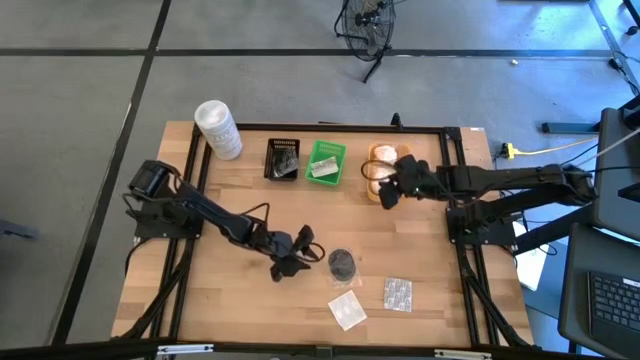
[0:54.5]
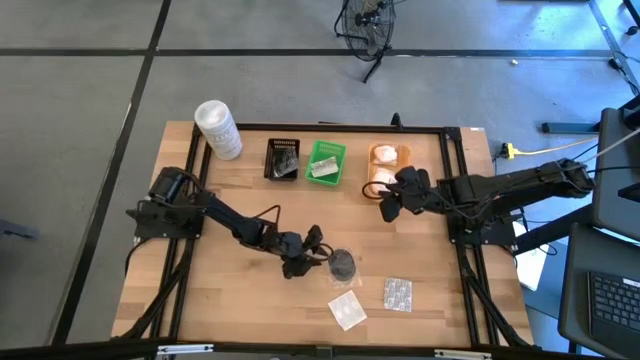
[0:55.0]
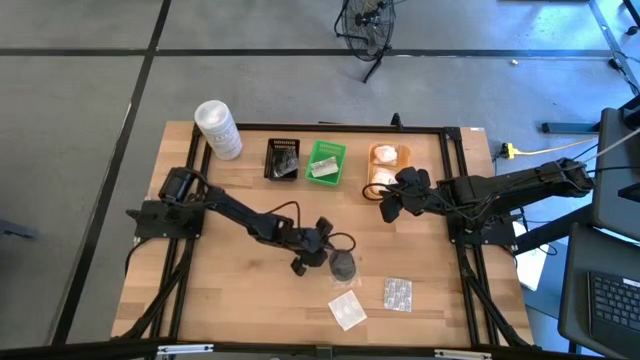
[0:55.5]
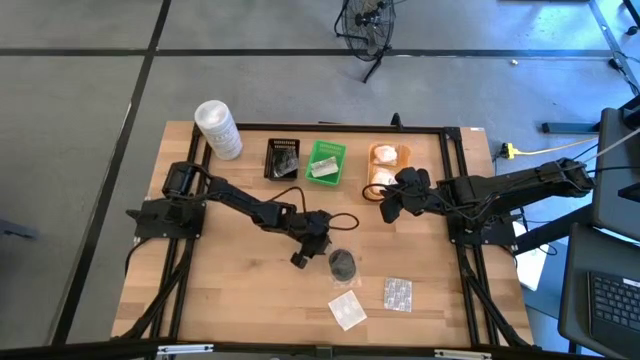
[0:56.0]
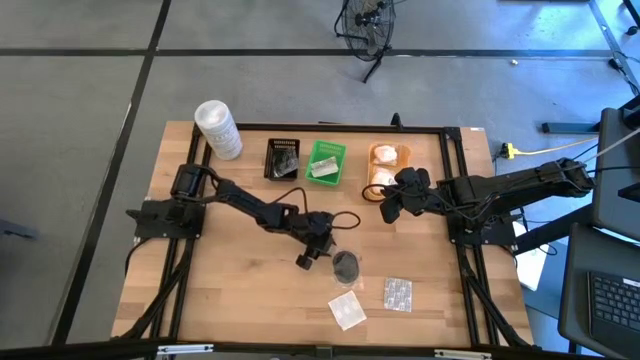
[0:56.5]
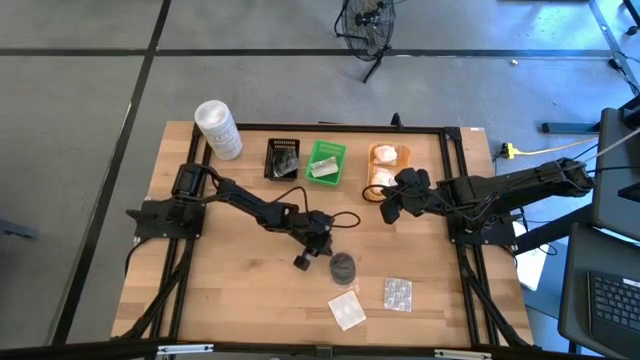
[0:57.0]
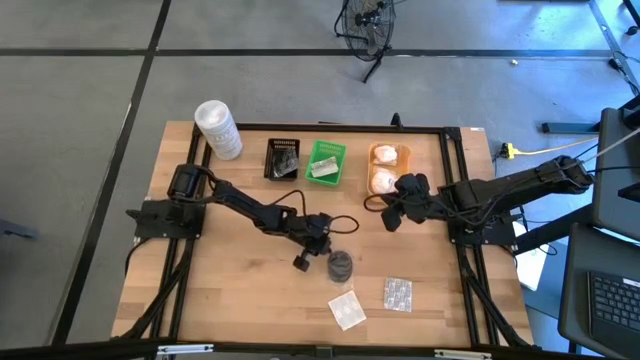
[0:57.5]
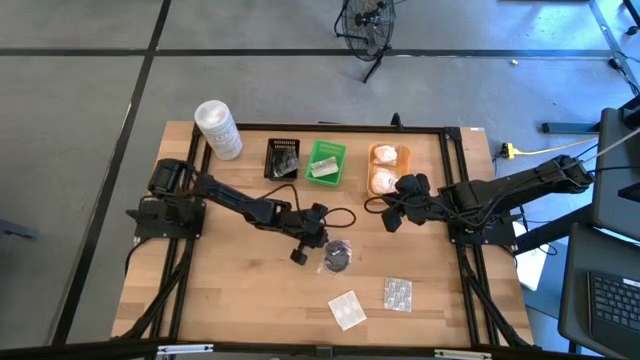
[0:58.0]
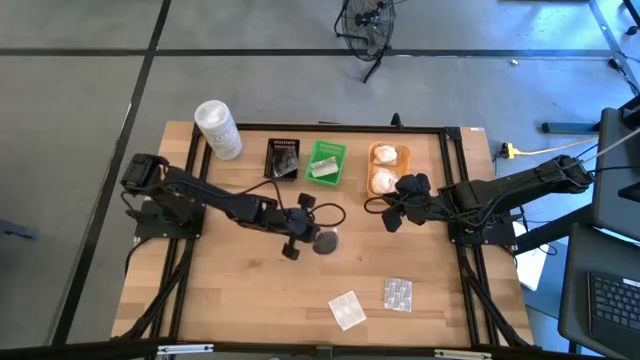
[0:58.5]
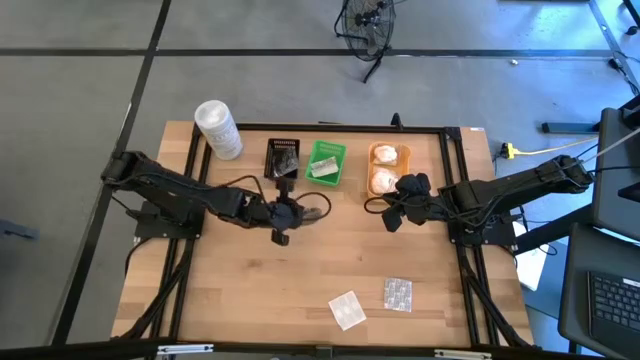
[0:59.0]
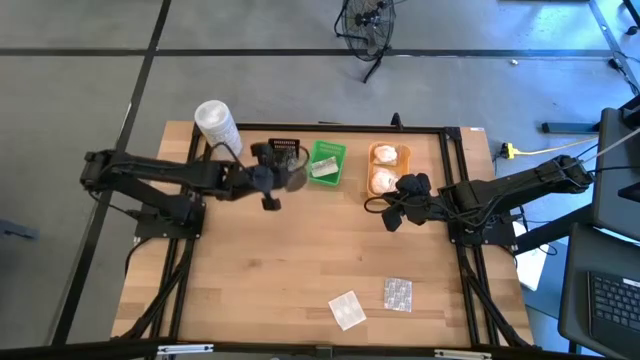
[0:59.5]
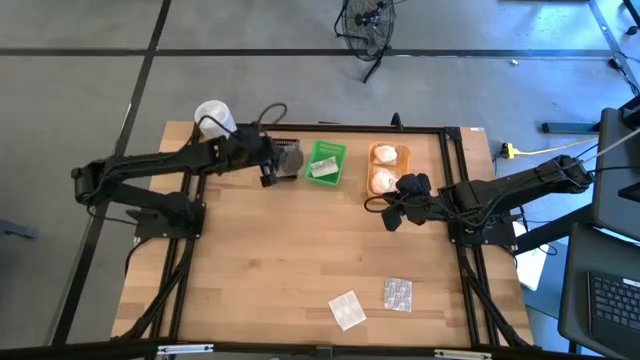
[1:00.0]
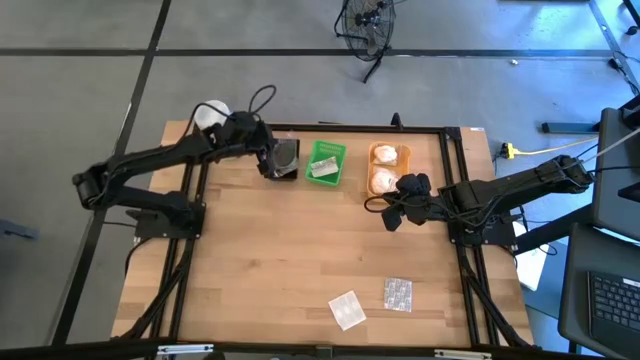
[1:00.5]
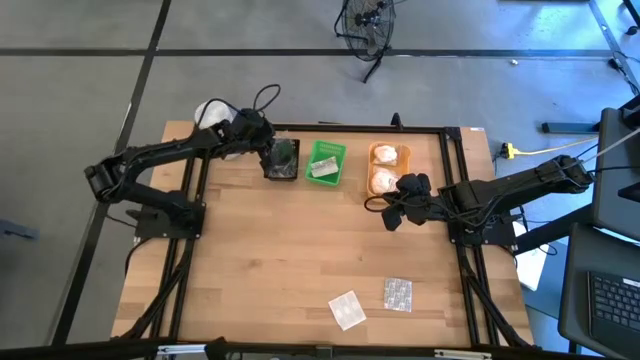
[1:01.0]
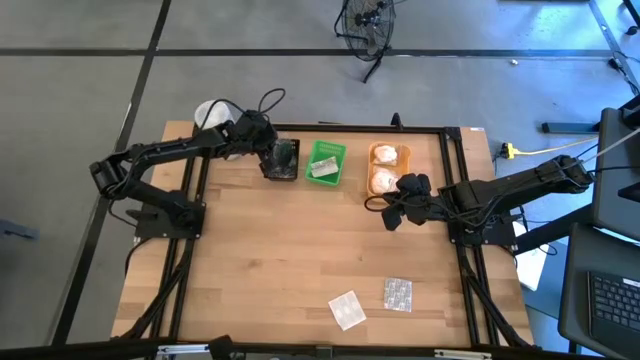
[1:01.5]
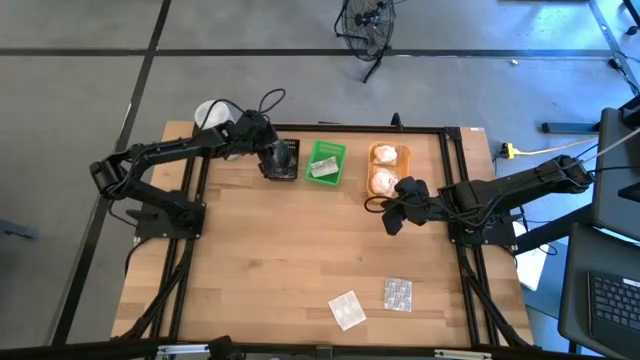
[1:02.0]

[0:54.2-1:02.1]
Task: Pick & Place Travel size toiletries
Put the black hairbrush into the black bin

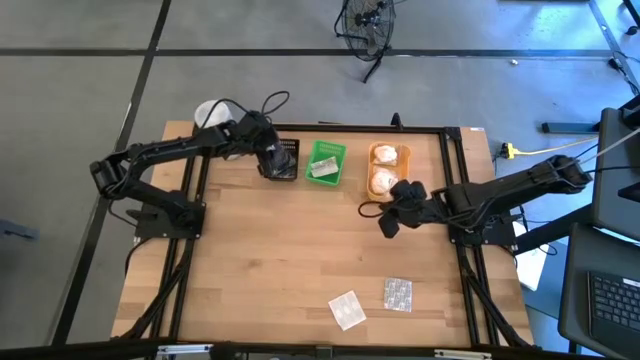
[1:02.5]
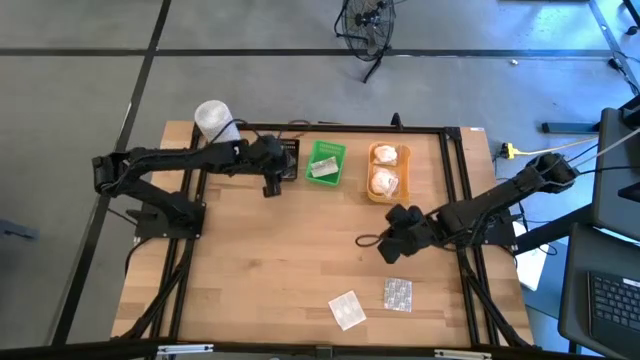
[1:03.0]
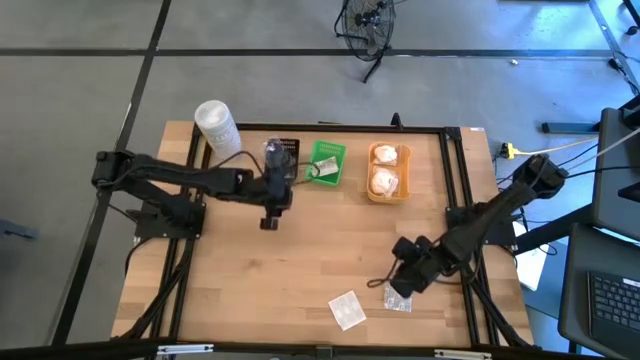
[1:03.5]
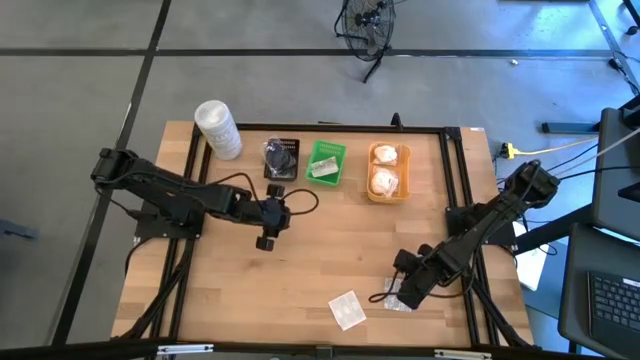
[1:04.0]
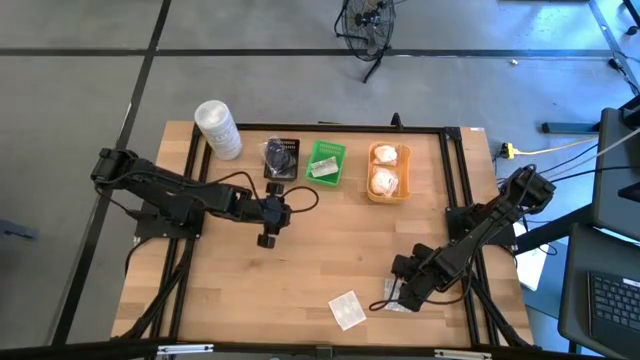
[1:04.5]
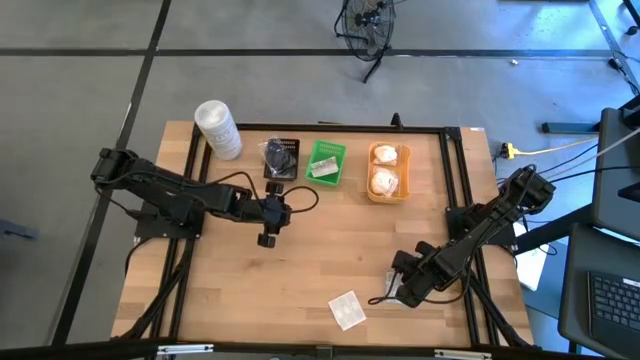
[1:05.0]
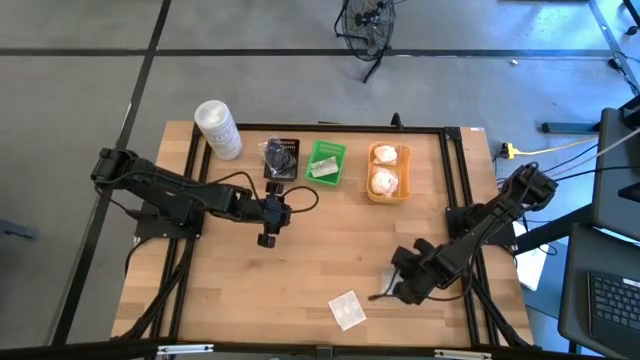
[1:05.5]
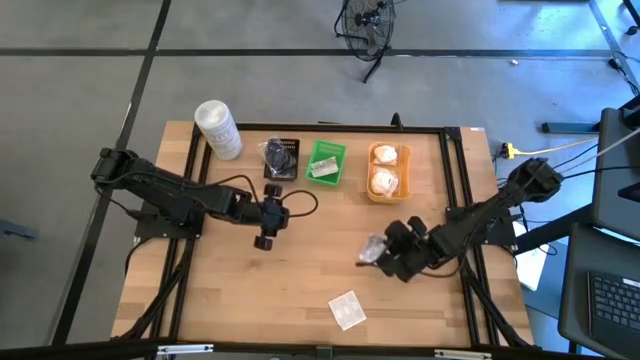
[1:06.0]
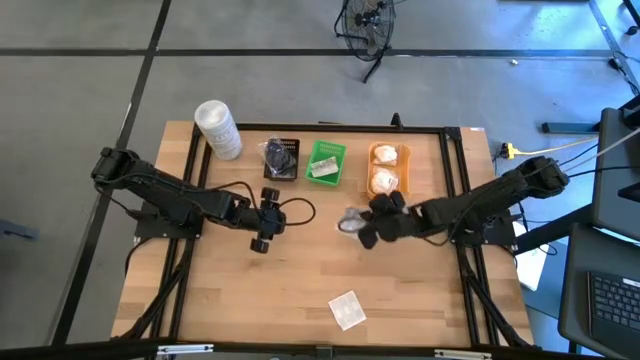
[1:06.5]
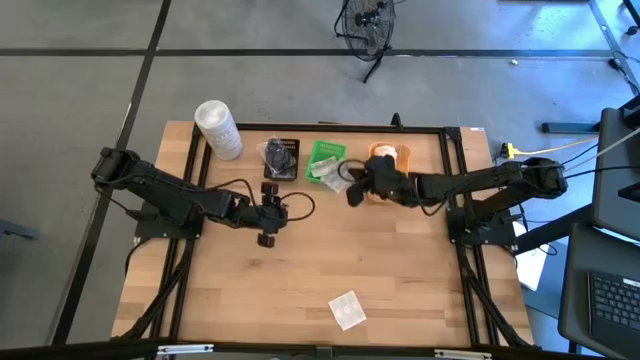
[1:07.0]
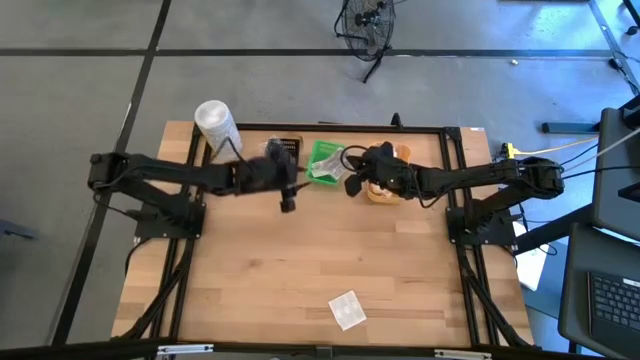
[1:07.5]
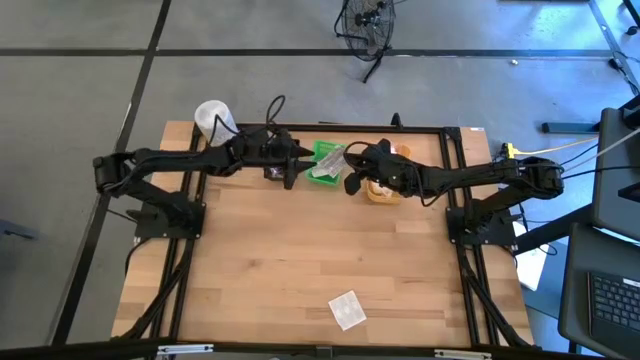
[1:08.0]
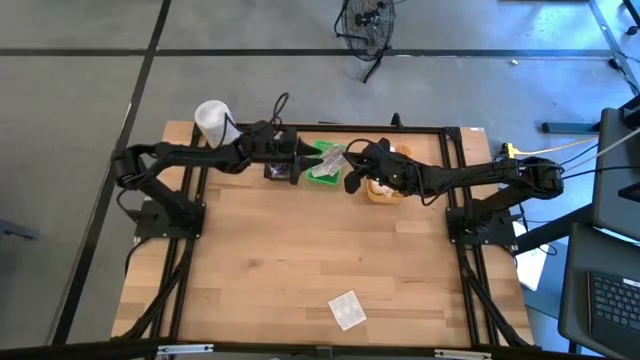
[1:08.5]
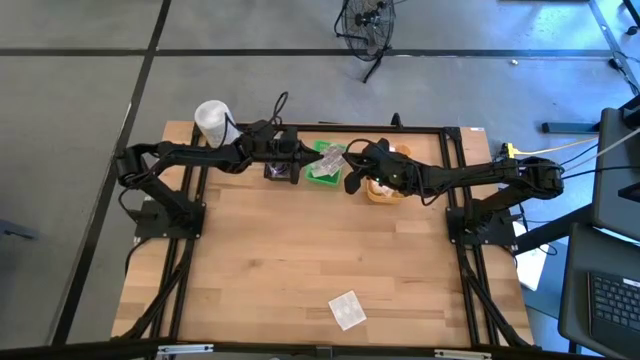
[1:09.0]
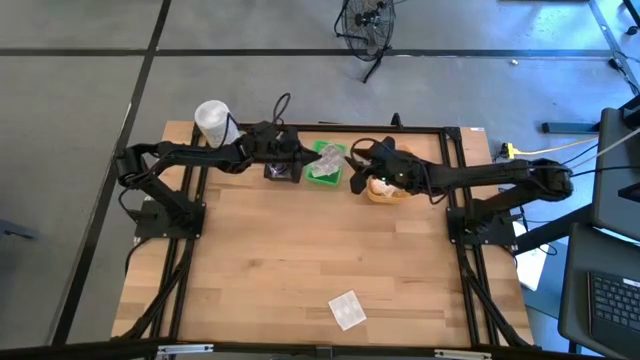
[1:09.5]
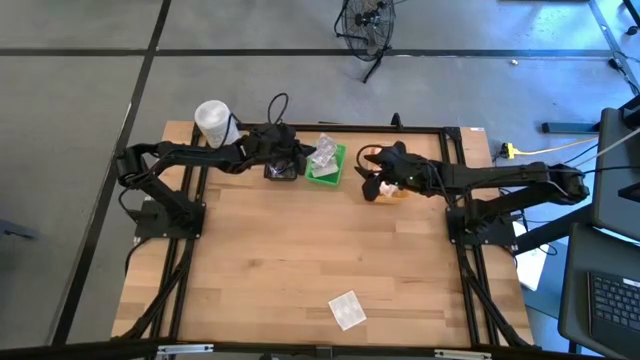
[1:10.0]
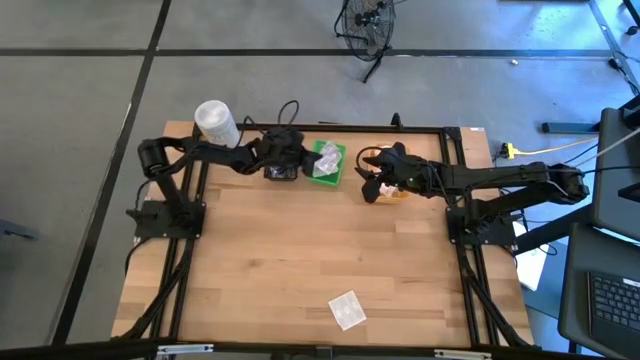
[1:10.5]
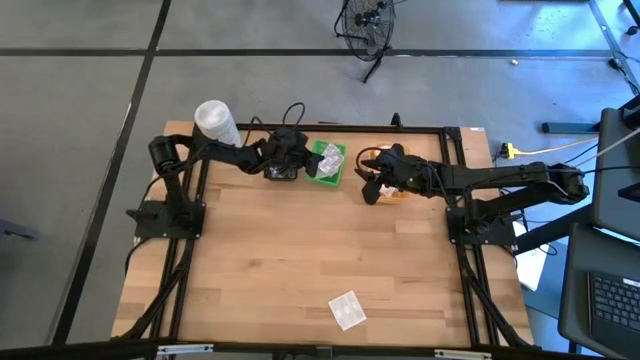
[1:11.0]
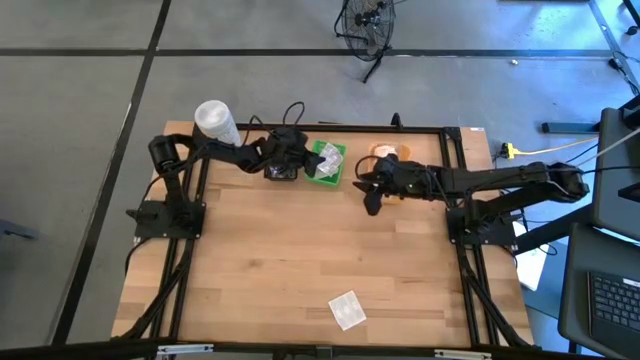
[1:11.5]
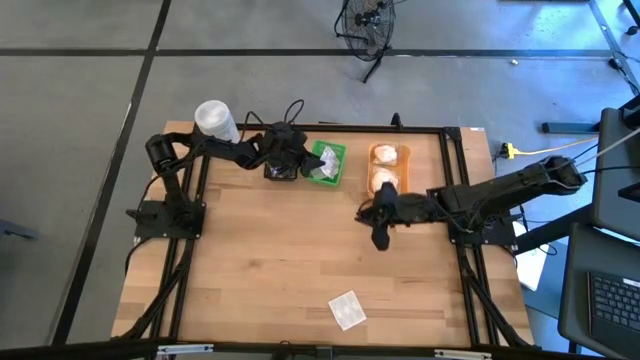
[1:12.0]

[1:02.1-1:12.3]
Put the white bandage pack into the green bin

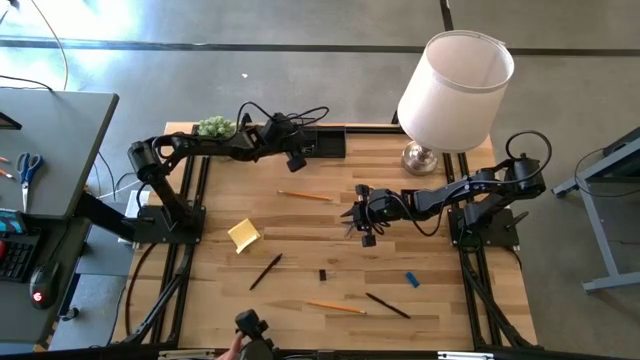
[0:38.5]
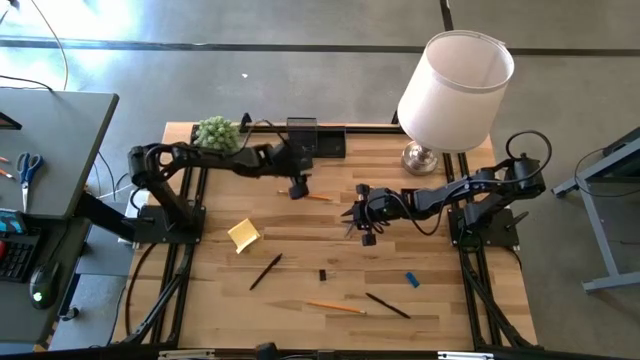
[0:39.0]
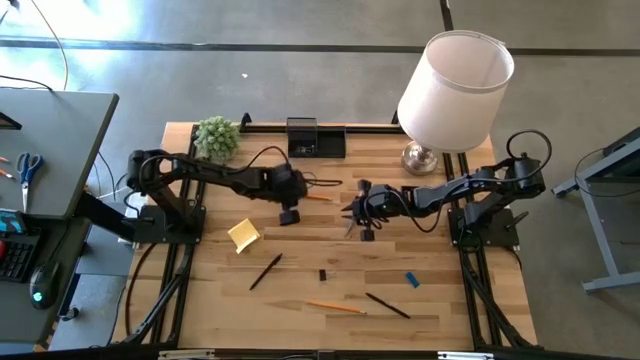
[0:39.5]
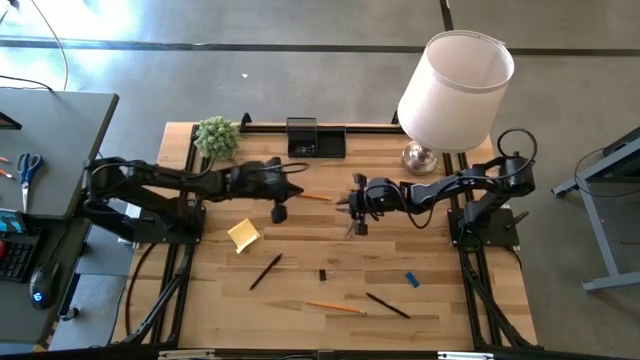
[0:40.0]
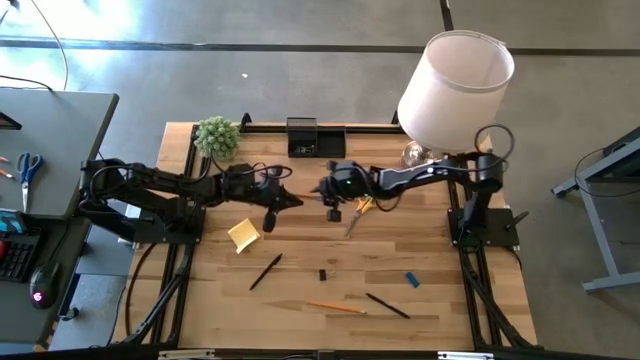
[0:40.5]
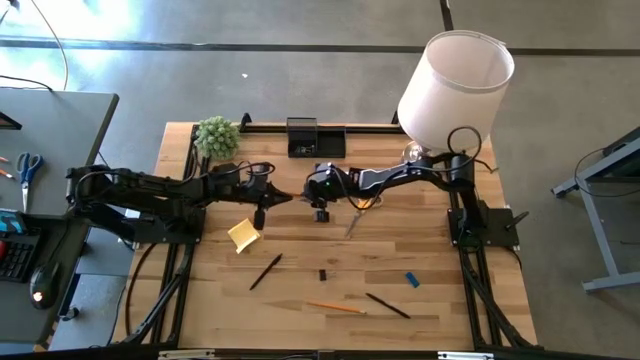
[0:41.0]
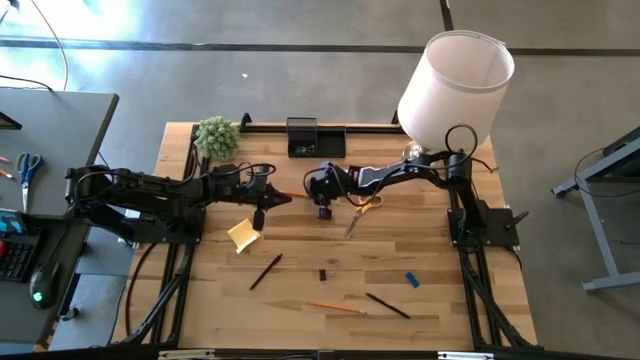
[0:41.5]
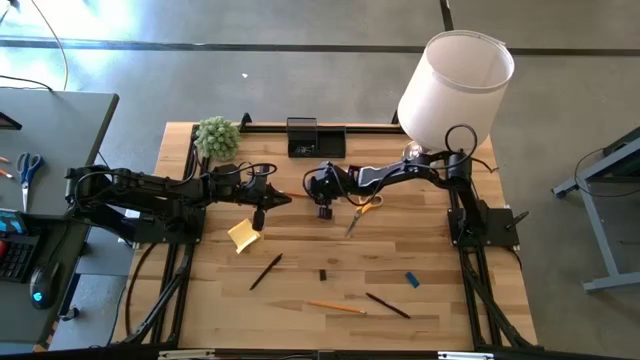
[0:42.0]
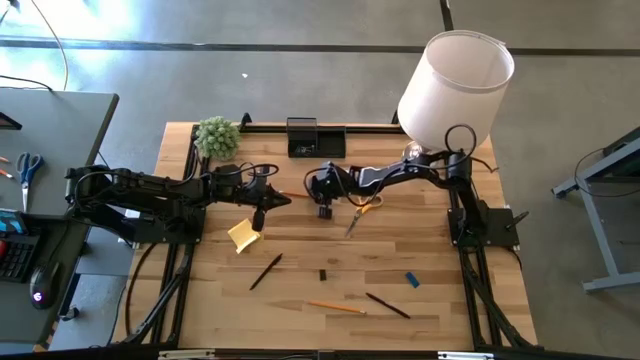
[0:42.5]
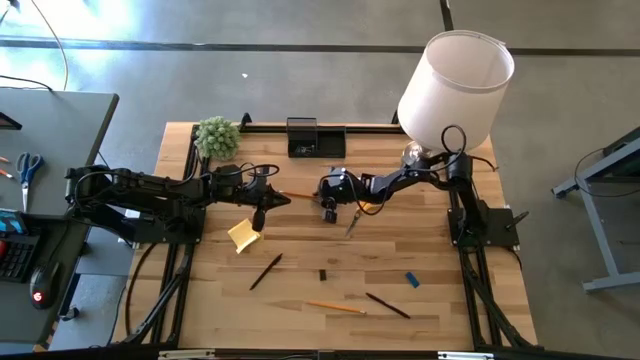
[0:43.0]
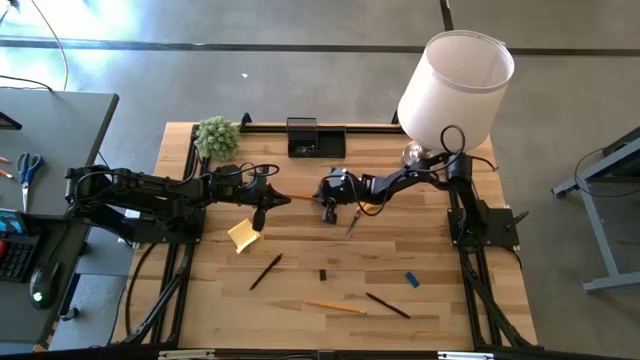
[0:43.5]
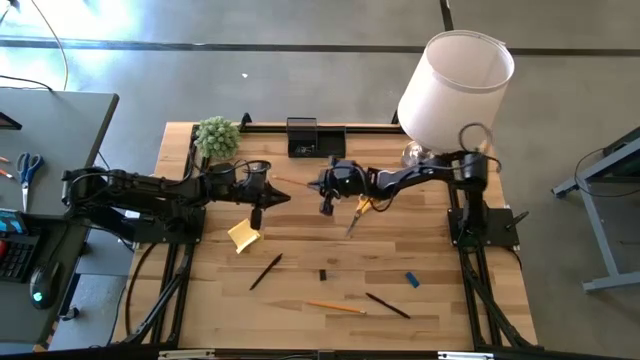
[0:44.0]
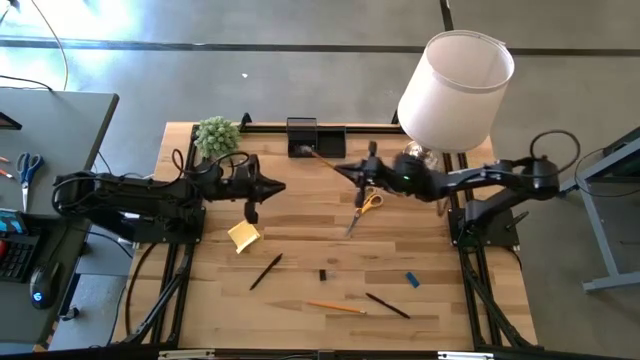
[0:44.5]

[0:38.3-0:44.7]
Task: Pick and place office supplies into organizer
Put the top orange pencil into the top left slot of the desk organizer
